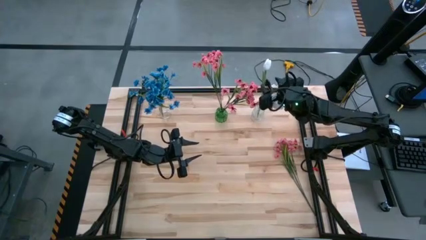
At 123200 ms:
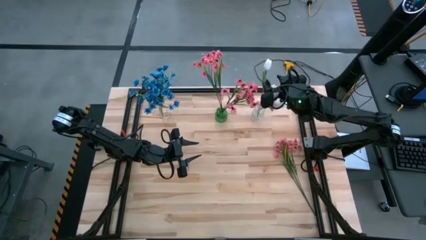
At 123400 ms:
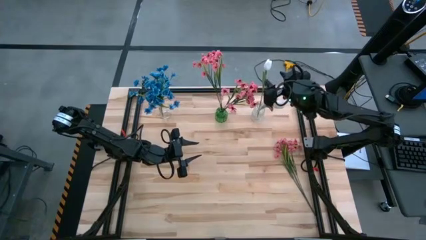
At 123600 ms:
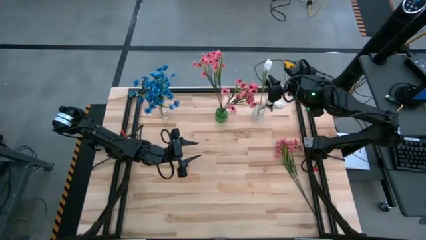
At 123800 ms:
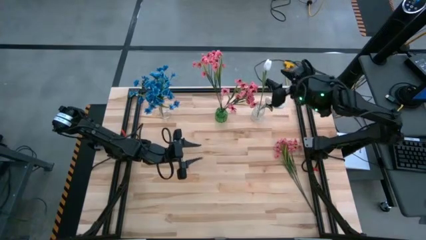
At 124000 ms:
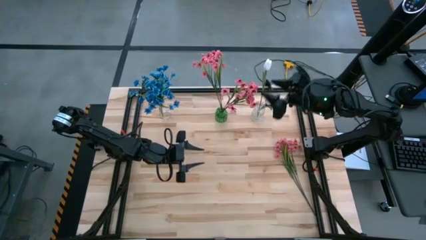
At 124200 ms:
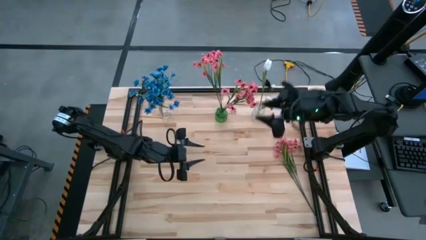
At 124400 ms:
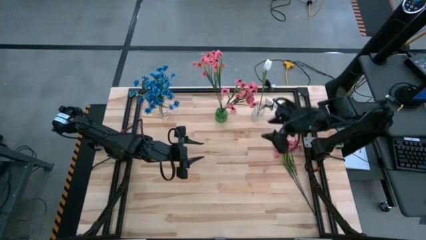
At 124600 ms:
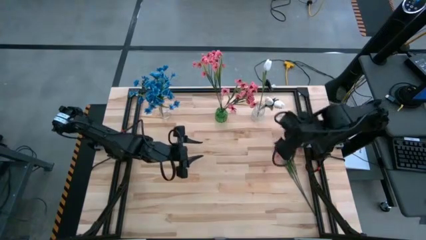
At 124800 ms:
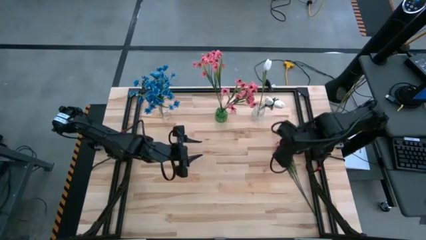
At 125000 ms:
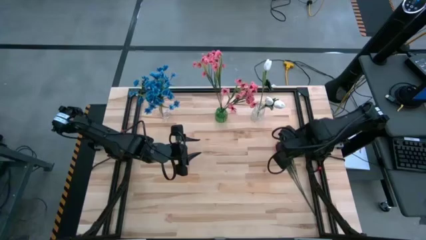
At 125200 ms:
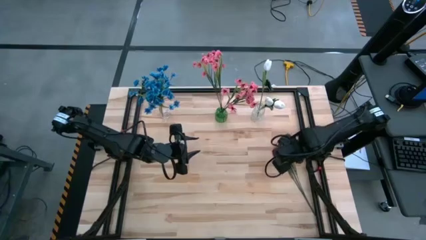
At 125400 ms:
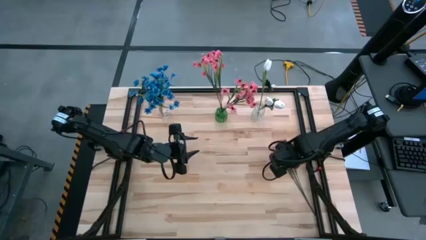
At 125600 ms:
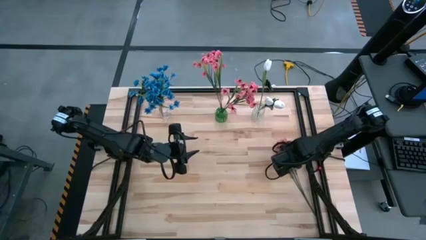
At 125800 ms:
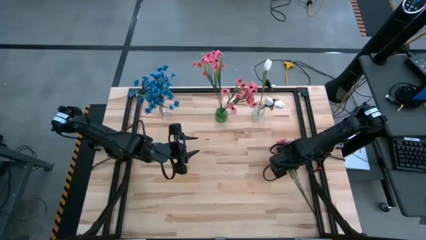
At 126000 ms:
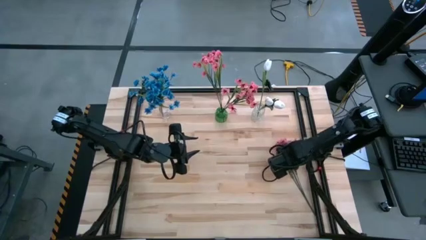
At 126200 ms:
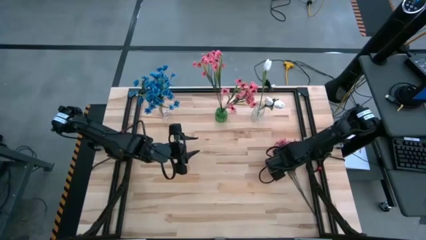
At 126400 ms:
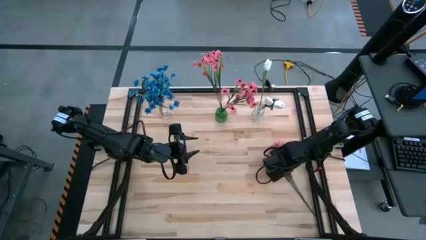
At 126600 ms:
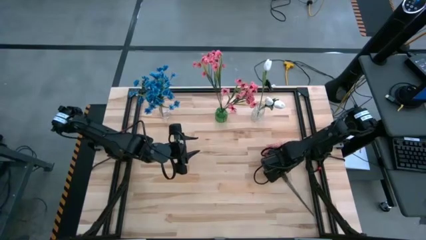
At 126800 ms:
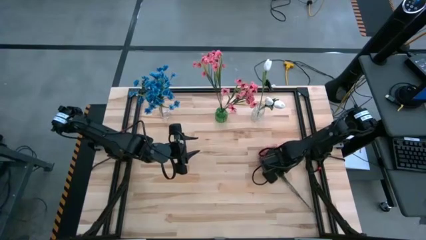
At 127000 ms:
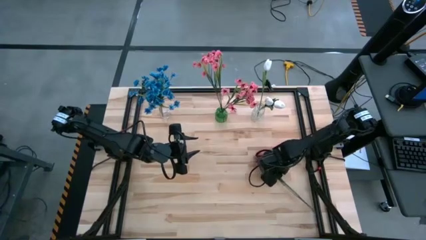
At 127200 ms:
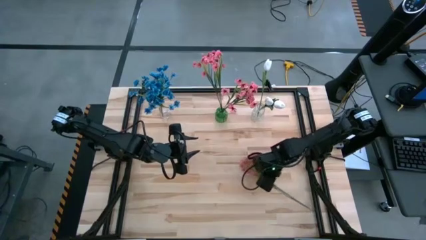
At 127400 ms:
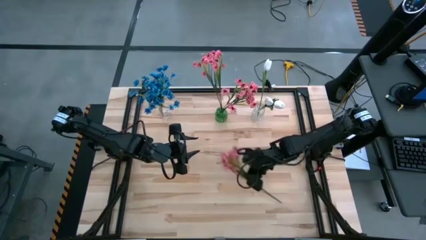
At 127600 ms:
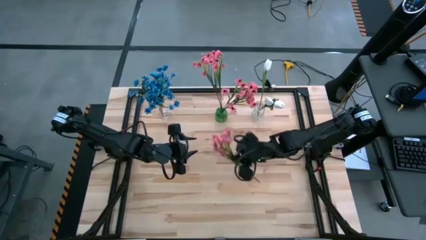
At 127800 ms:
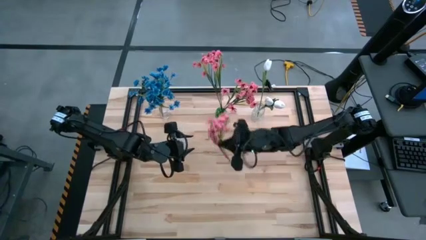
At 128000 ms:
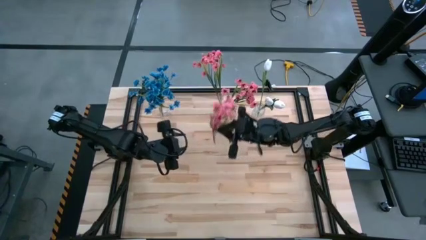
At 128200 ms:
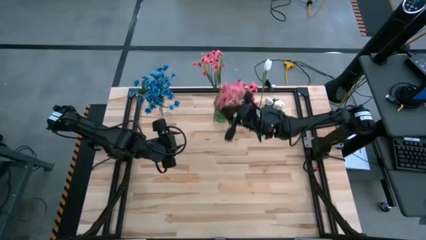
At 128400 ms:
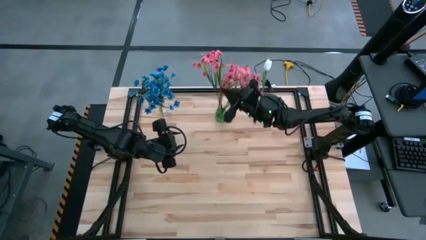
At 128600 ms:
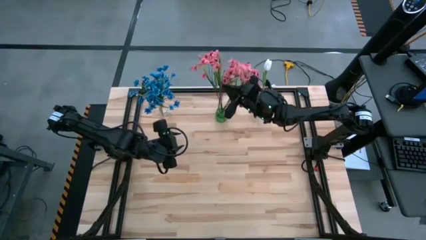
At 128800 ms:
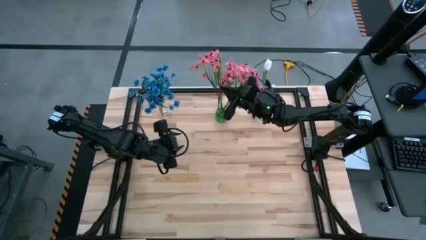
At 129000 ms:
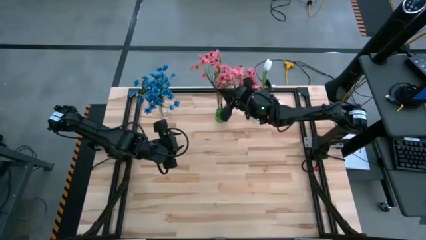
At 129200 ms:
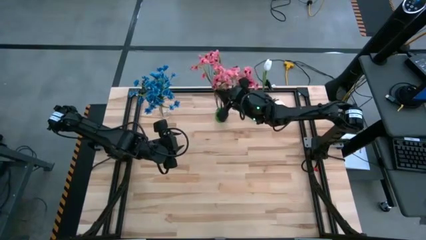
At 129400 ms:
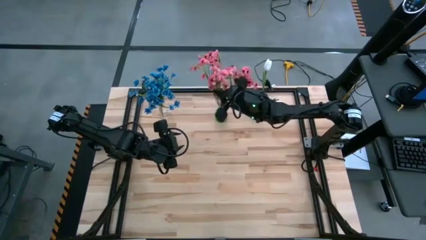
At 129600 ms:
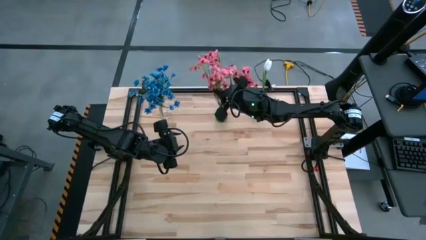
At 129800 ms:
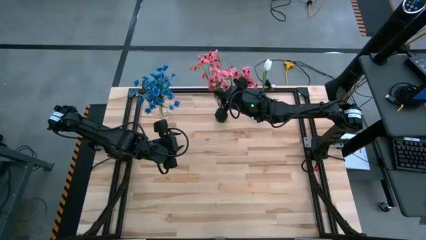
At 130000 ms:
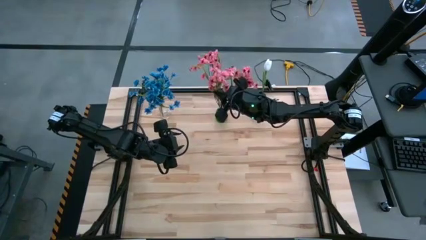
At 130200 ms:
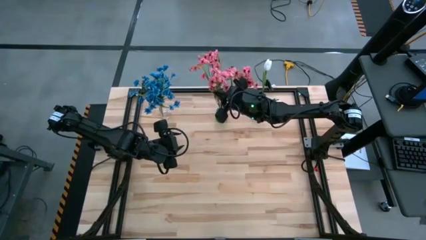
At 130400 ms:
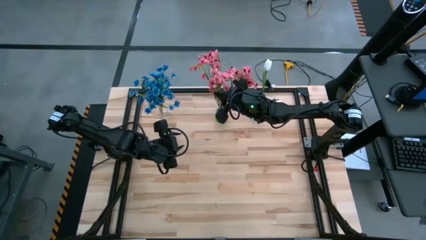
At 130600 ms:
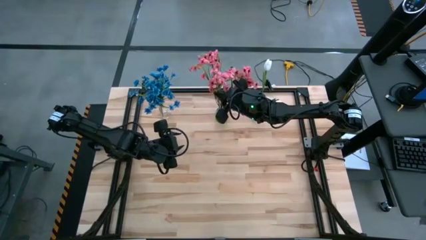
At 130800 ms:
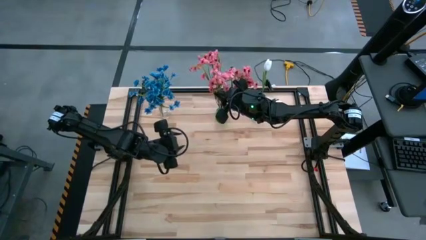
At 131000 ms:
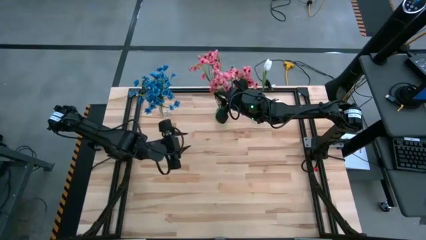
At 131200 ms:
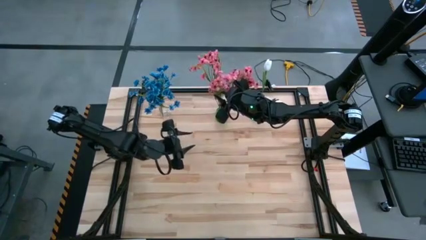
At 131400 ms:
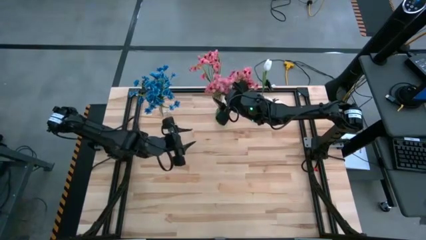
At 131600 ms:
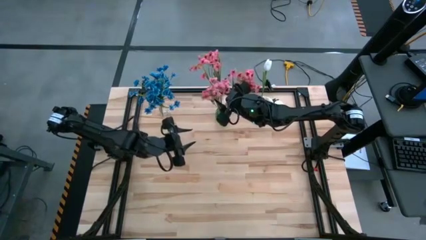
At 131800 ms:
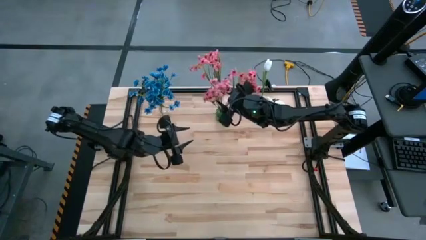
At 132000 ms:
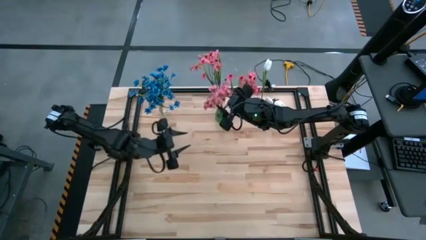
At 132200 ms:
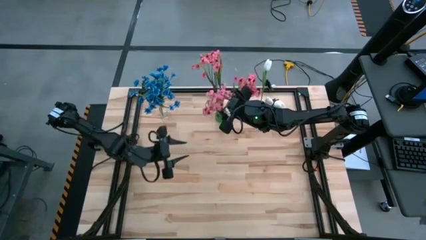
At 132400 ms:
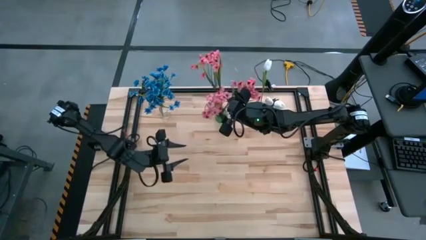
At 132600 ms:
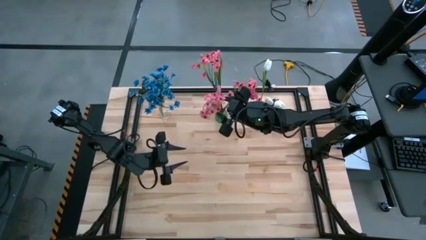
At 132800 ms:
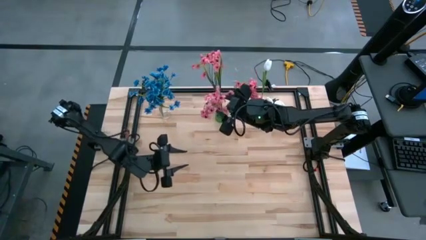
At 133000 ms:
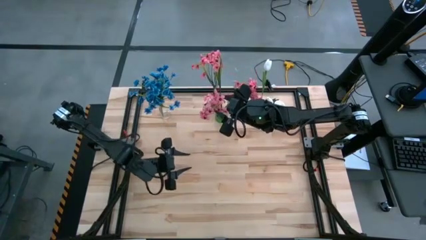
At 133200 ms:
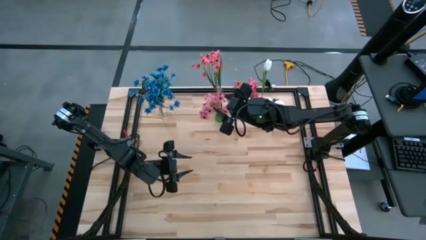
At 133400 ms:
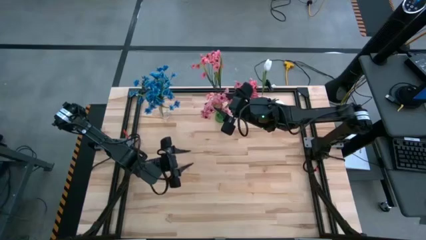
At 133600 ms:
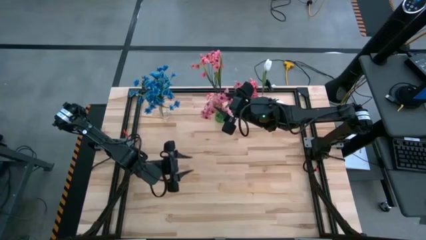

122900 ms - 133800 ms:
Task: Sort flowers into vase by color
Put the right pink flower into the green vase
